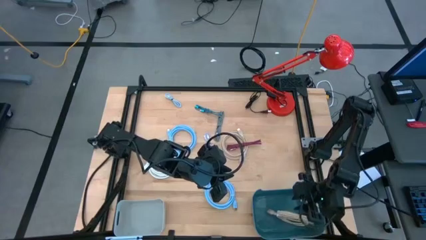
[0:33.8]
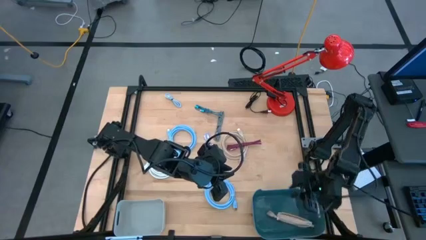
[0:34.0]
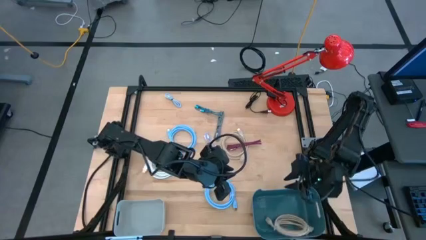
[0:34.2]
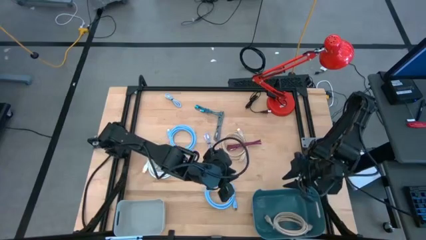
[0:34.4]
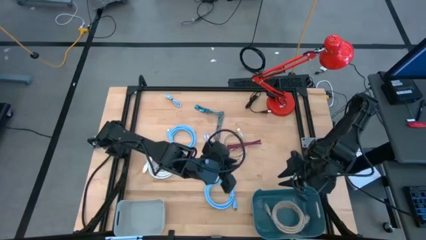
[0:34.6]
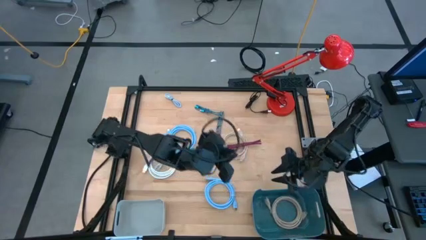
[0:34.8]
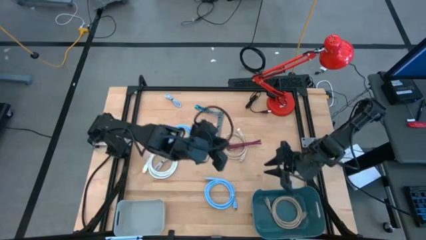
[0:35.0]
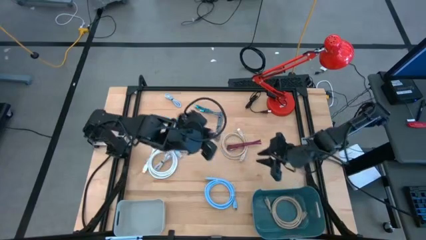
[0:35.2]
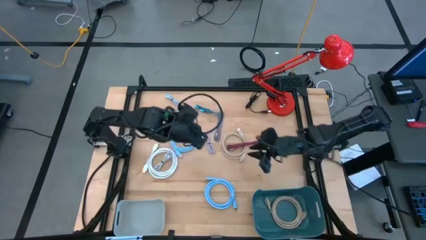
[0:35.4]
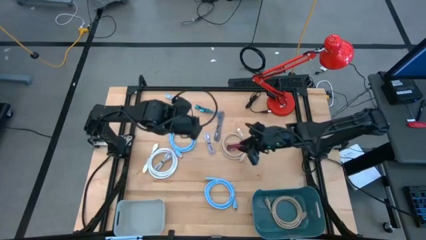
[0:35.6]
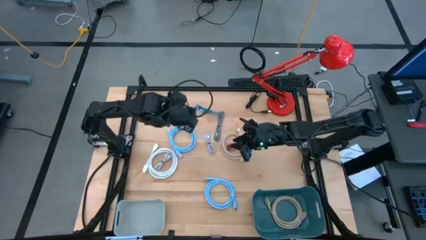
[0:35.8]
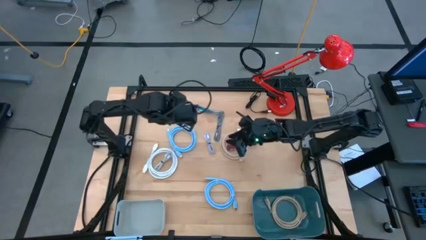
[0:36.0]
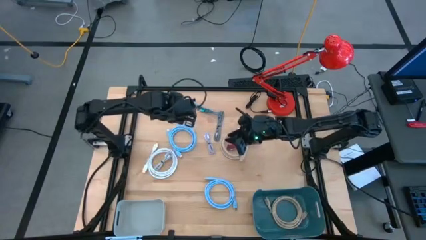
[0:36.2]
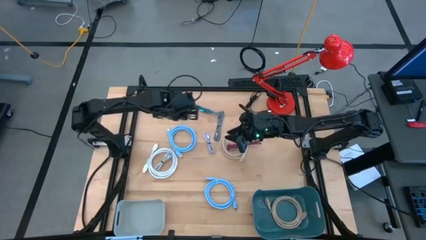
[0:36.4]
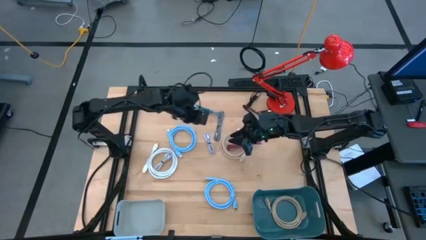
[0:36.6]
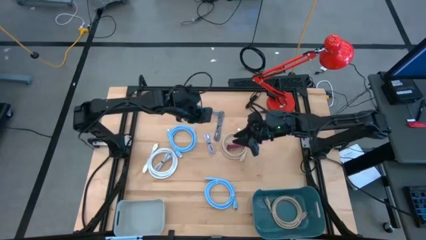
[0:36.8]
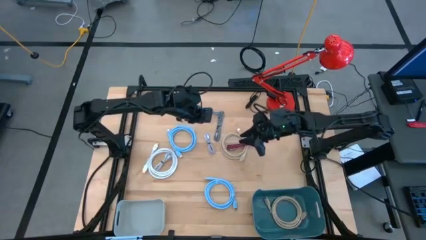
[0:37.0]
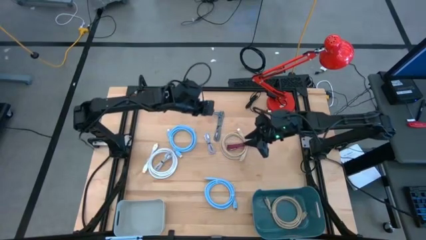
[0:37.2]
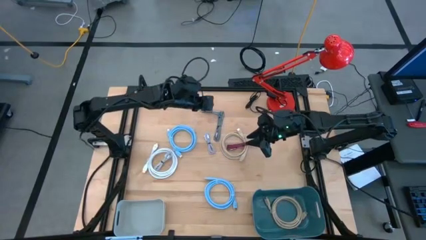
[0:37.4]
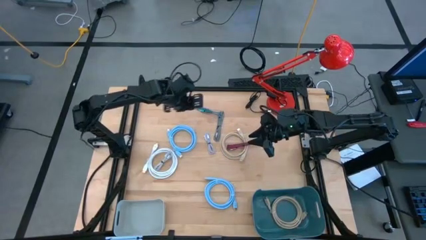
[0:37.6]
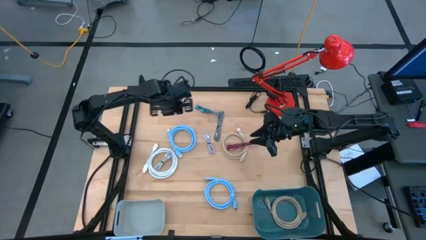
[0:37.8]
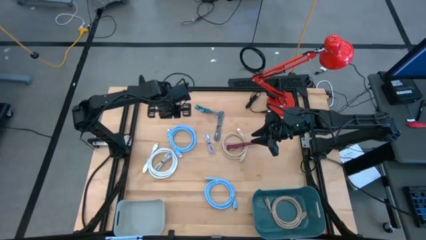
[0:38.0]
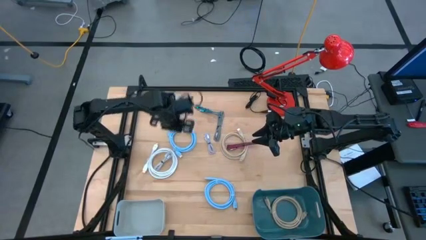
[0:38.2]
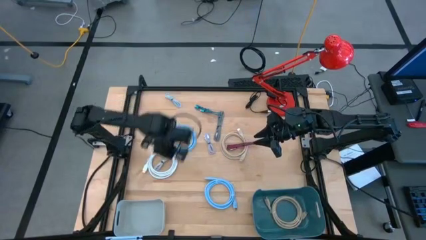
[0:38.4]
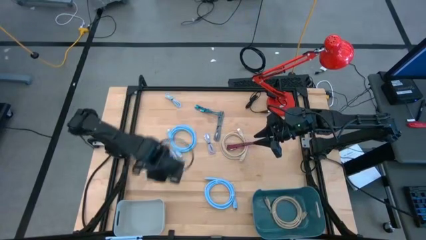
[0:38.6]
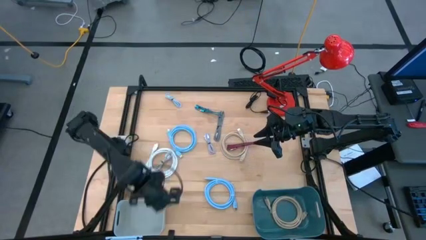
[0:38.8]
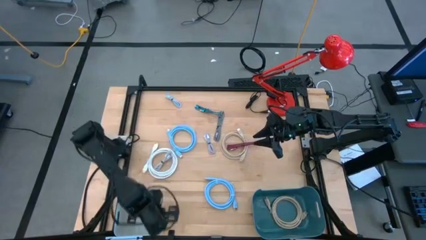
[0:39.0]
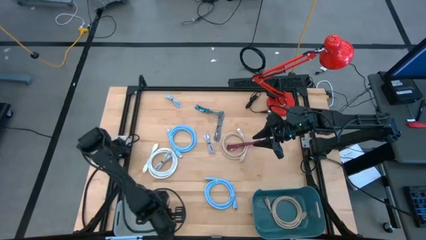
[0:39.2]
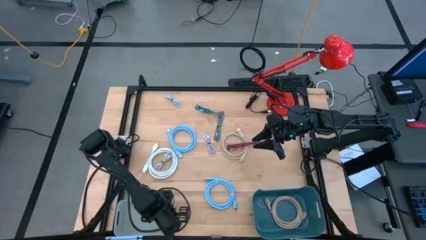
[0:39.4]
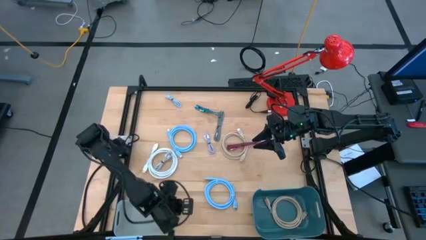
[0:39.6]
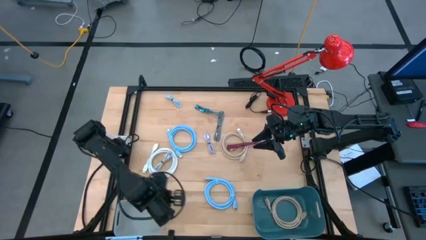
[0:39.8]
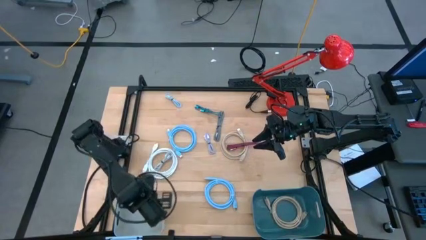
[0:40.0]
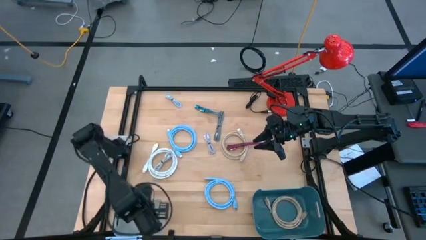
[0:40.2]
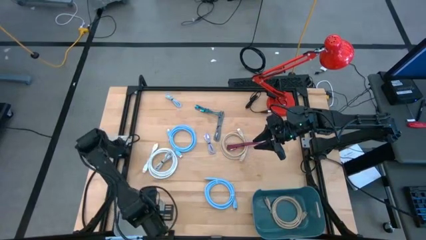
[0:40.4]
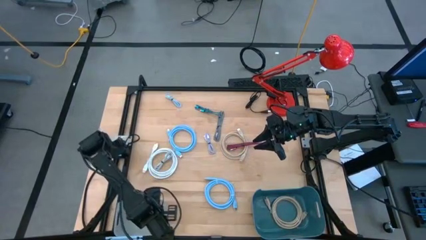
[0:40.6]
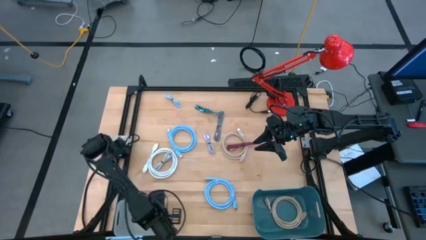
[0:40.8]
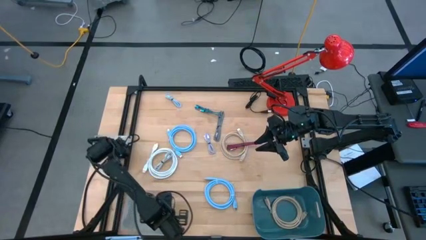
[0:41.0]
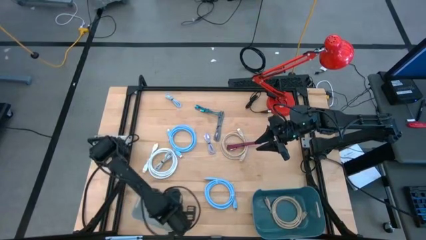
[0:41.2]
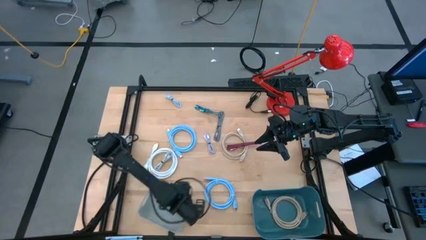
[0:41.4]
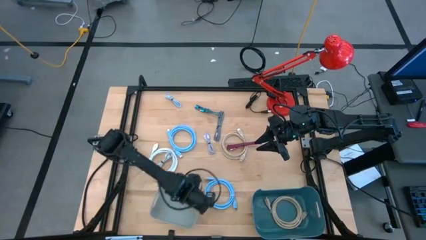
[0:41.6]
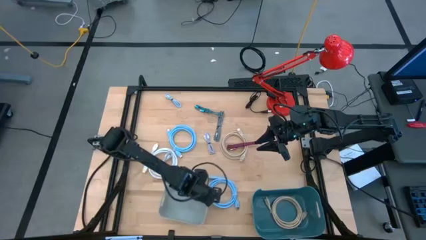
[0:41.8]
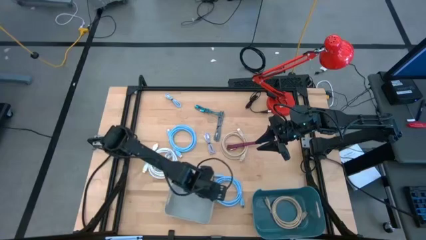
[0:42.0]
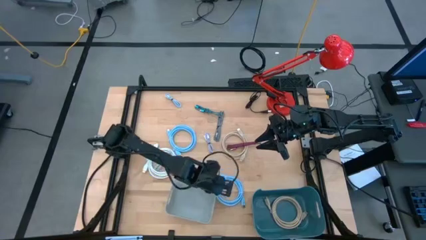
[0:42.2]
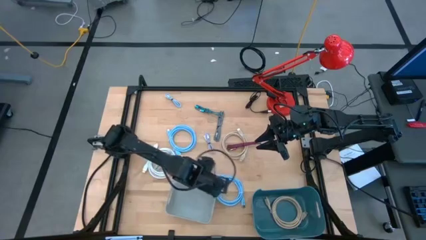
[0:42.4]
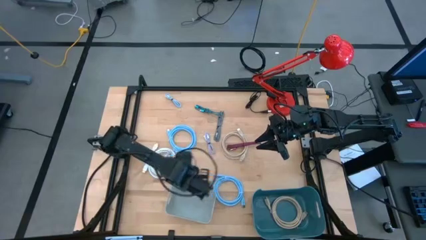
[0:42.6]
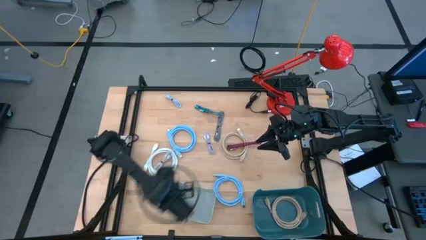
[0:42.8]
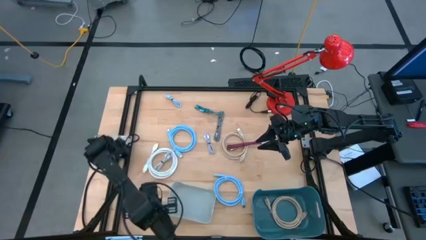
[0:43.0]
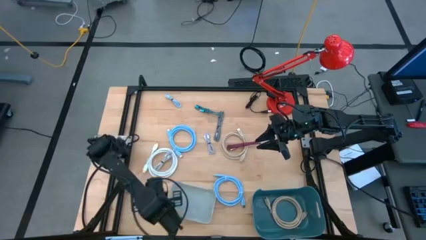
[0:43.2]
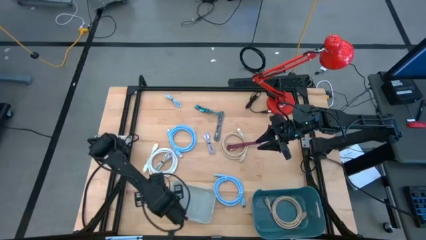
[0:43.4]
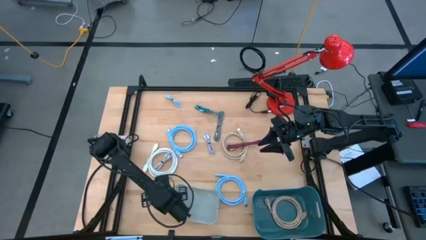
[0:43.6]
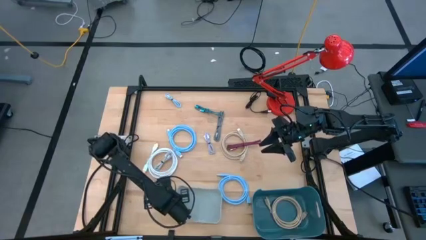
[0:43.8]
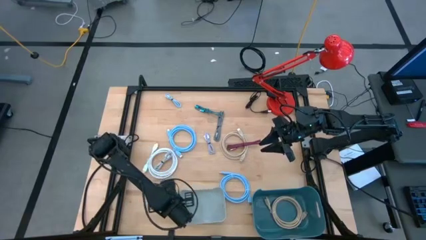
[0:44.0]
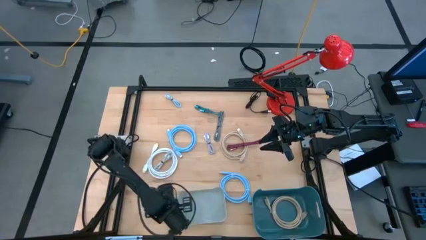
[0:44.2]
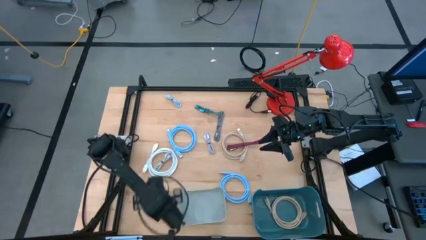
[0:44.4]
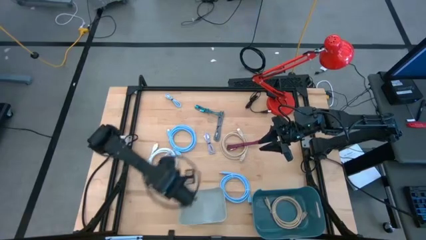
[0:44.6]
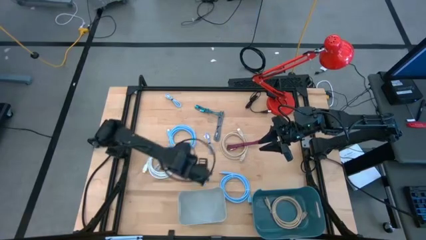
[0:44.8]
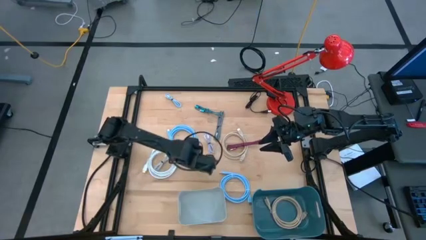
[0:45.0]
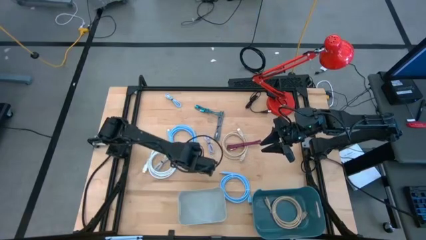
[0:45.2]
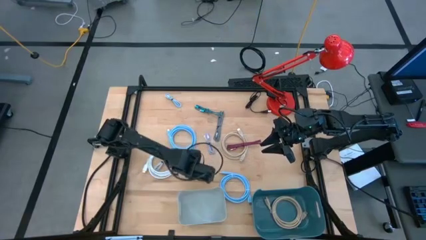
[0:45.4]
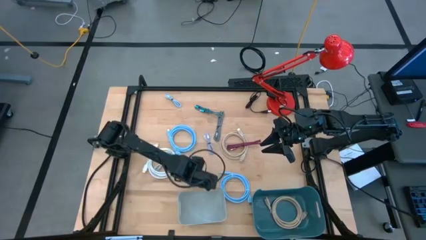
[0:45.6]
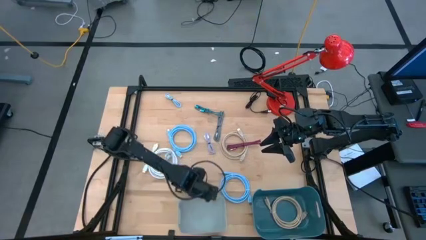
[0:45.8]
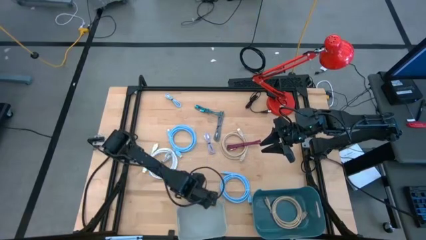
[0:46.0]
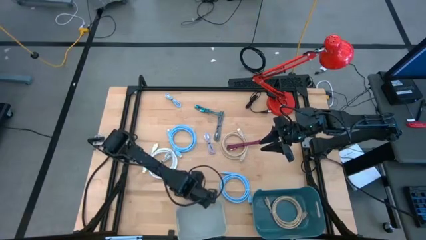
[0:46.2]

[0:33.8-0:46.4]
Task: Pick & Place USB Port
Adjust the gray bin

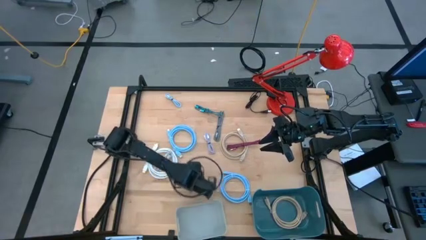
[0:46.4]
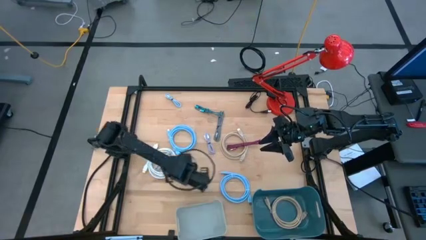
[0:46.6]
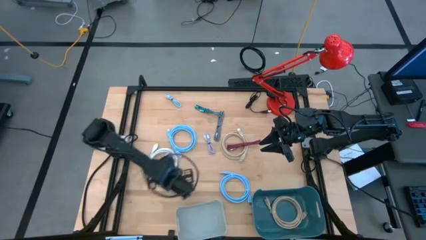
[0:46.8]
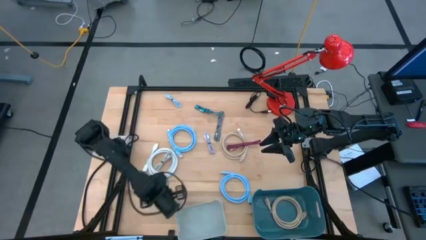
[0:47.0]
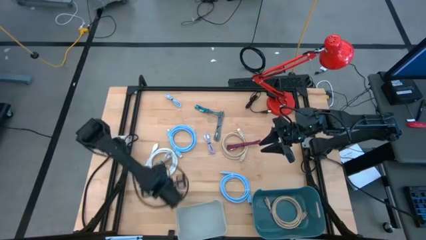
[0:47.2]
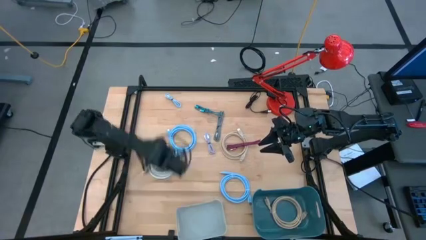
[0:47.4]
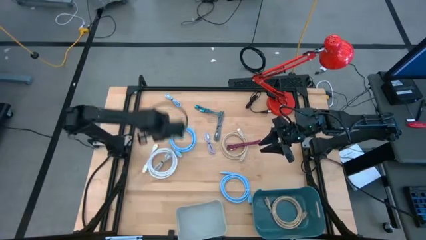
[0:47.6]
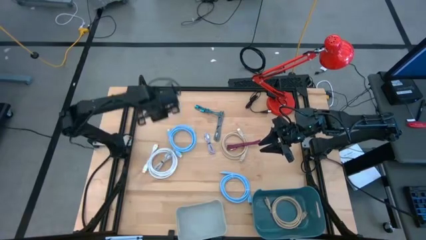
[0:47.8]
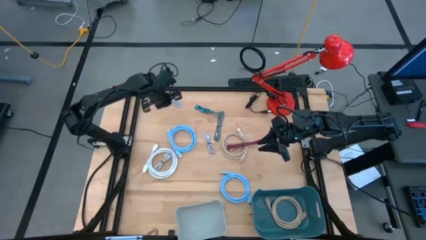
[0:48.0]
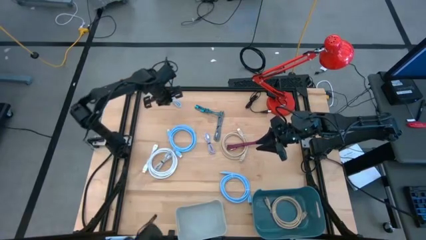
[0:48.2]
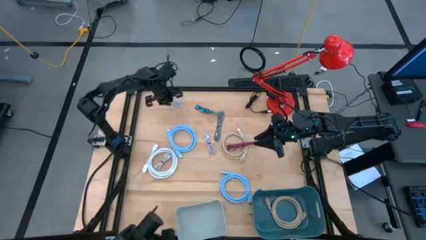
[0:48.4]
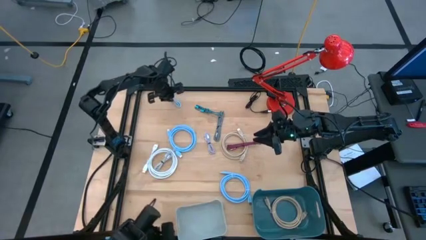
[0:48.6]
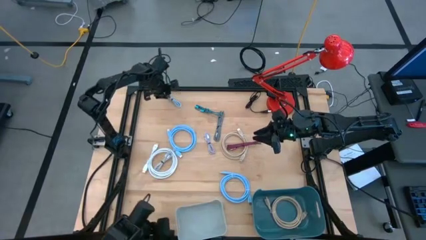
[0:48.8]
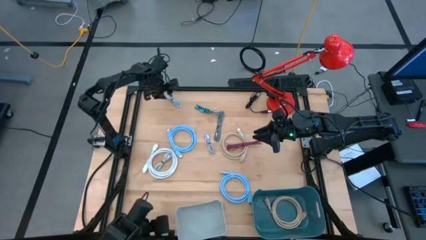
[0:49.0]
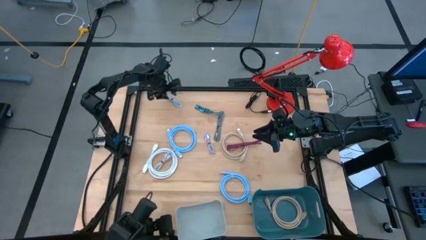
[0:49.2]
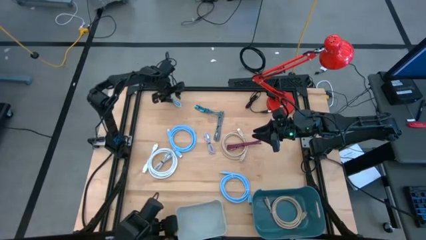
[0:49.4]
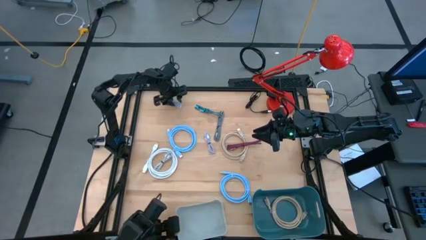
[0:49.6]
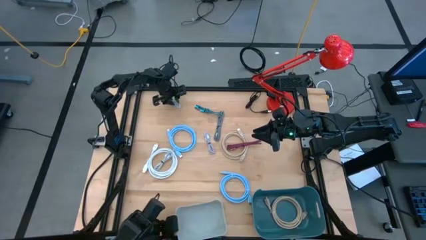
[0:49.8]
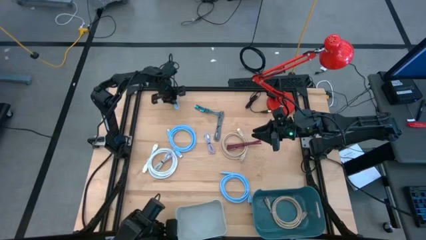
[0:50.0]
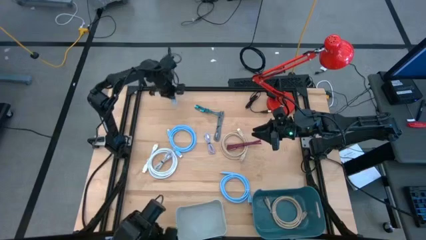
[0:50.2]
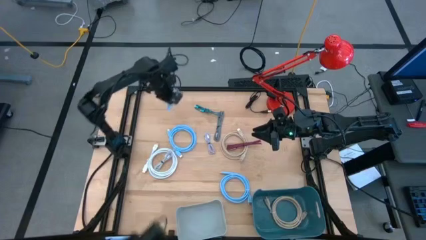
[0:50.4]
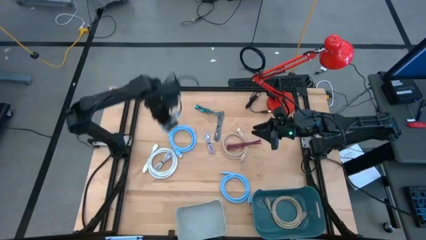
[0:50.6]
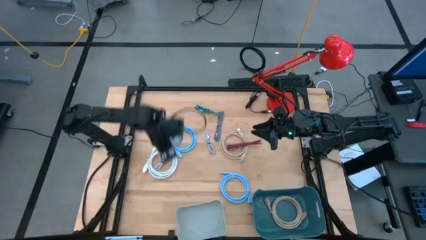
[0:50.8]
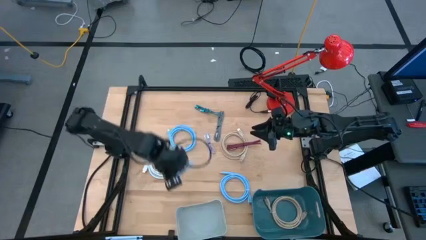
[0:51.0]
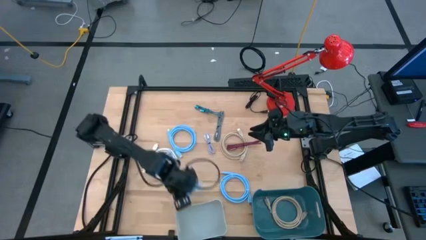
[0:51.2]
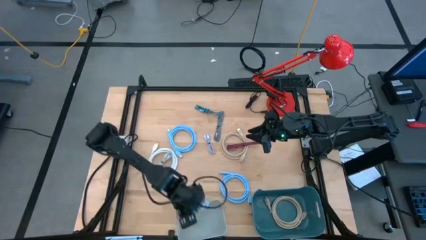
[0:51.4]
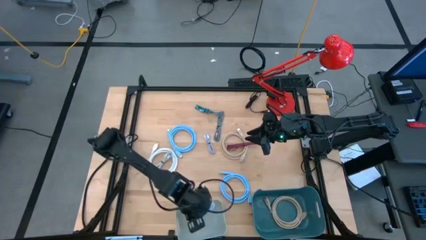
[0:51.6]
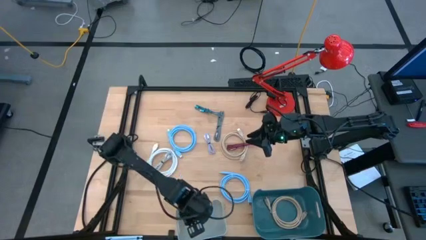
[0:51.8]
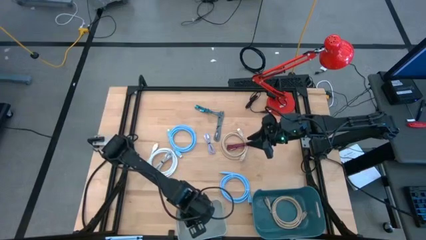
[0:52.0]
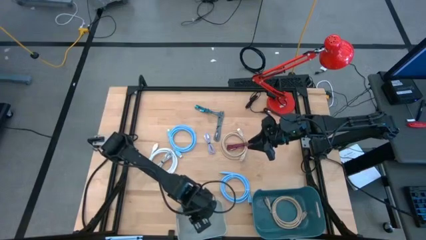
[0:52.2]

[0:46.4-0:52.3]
Put the blue charger cable into the gray bin
